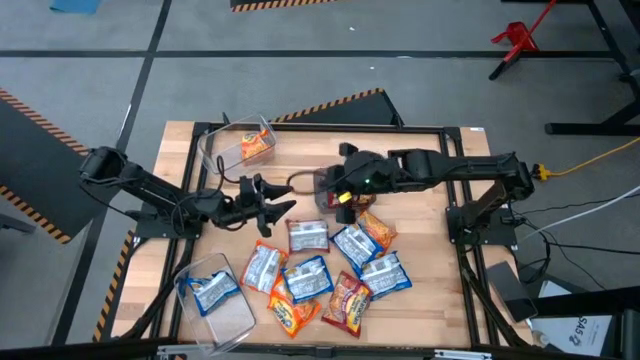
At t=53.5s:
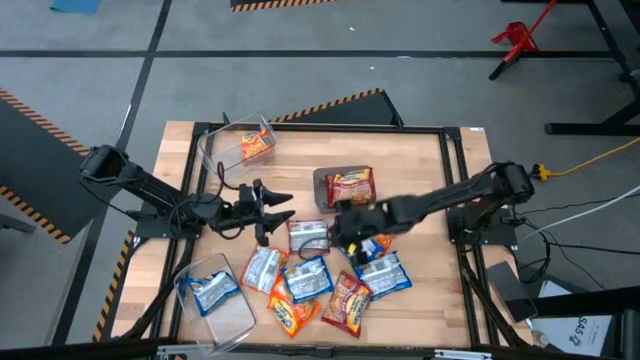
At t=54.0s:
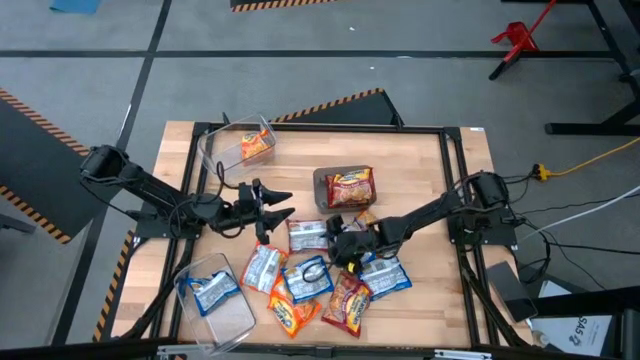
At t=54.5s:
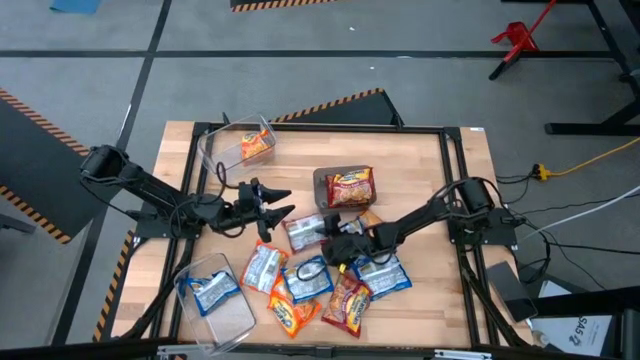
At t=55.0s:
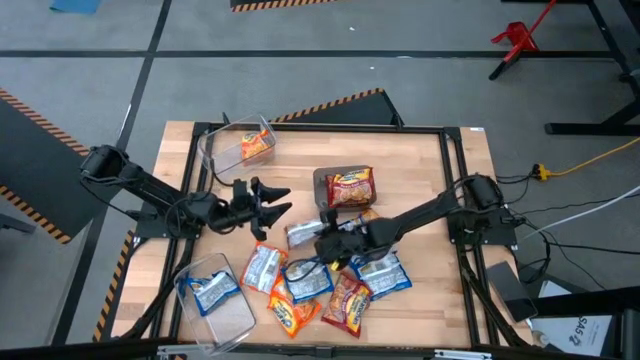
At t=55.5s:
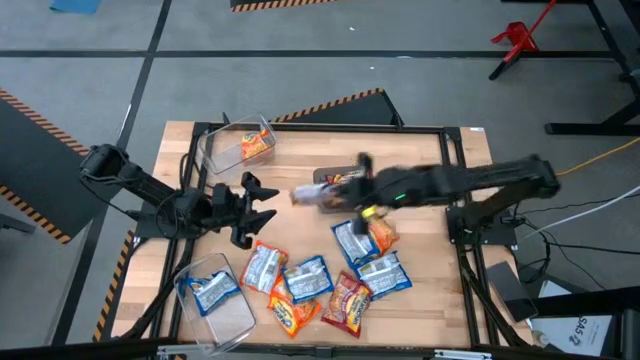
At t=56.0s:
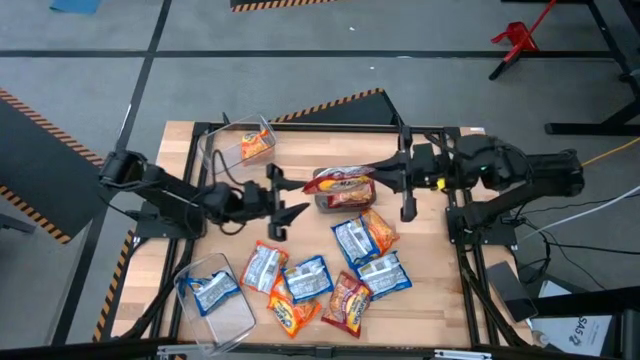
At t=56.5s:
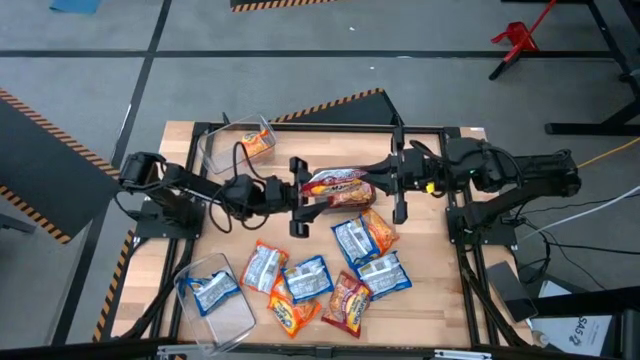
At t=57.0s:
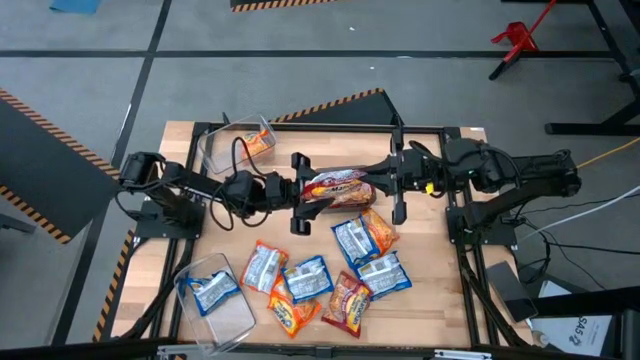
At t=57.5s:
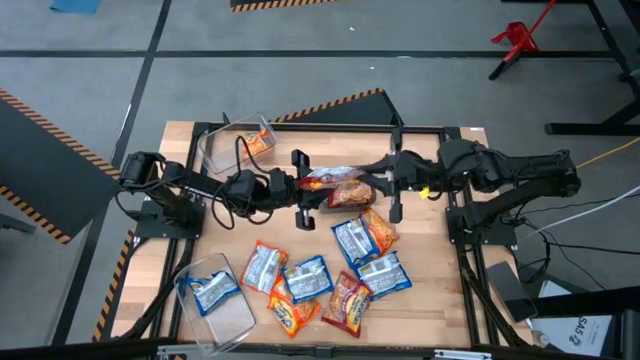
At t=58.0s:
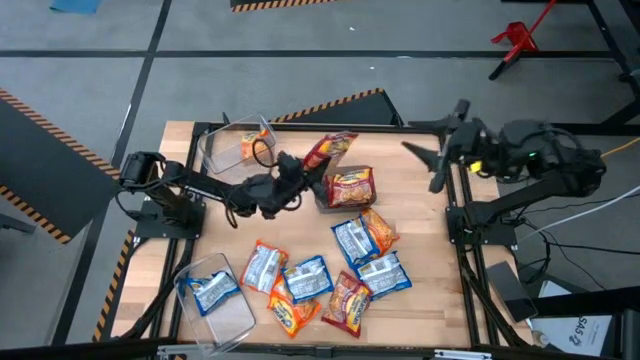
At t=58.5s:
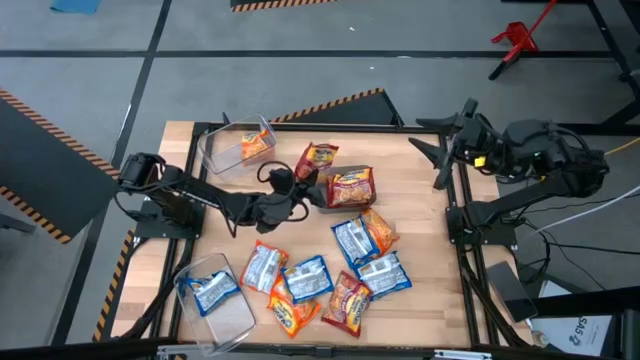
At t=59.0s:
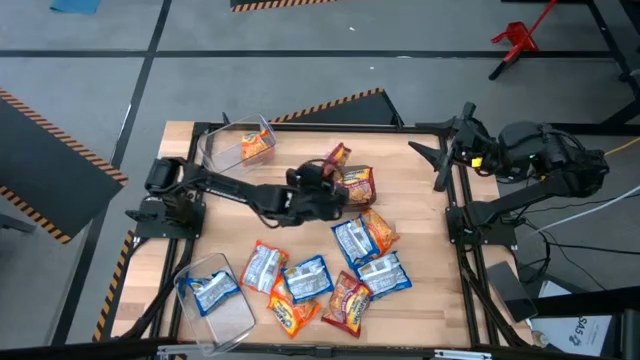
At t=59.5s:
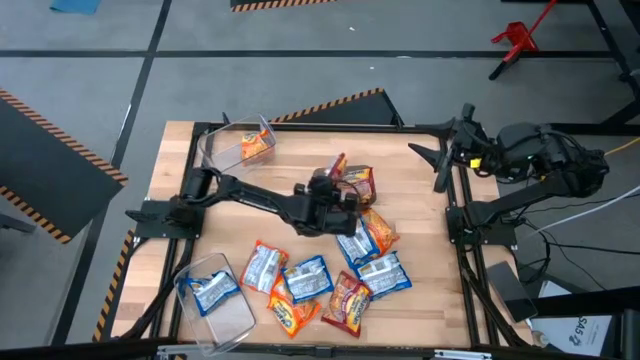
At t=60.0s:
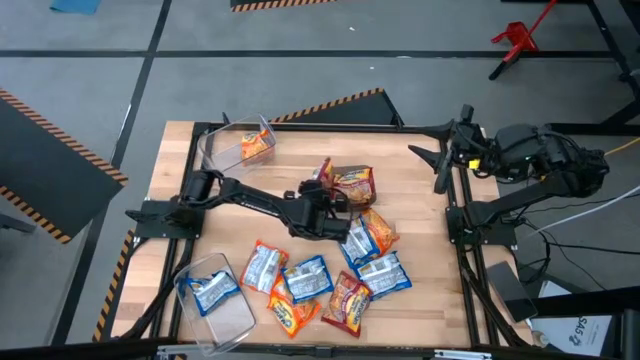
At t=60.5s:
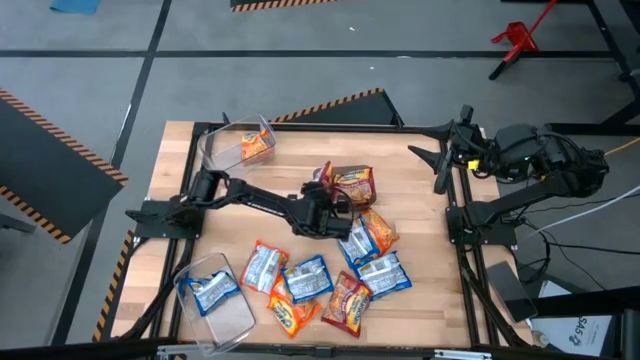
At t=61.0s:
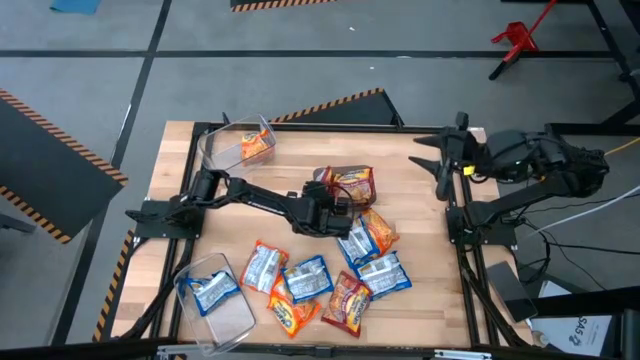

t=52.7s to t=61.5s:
Task: Sort Maruchan noodles
Put the red noodle pack into the black bin

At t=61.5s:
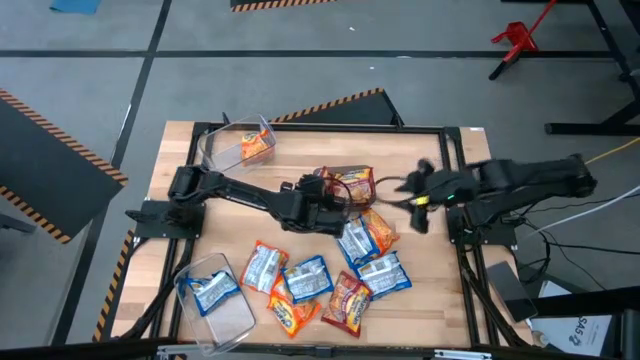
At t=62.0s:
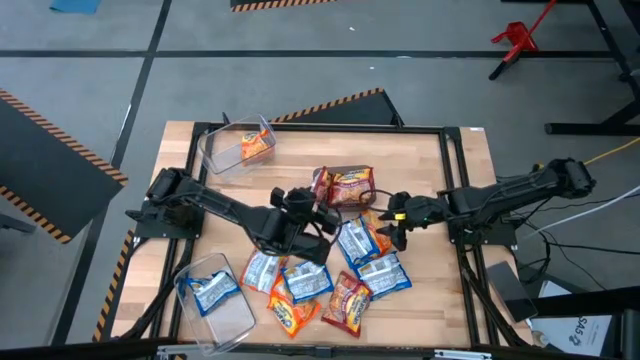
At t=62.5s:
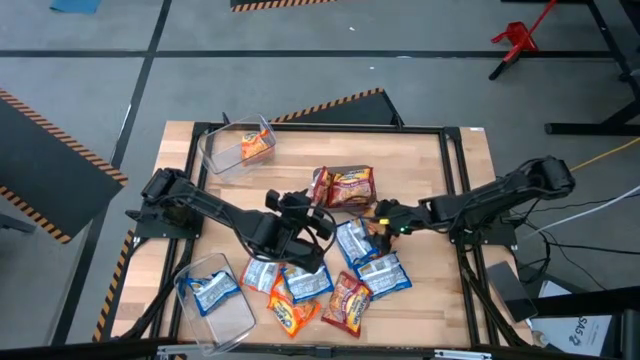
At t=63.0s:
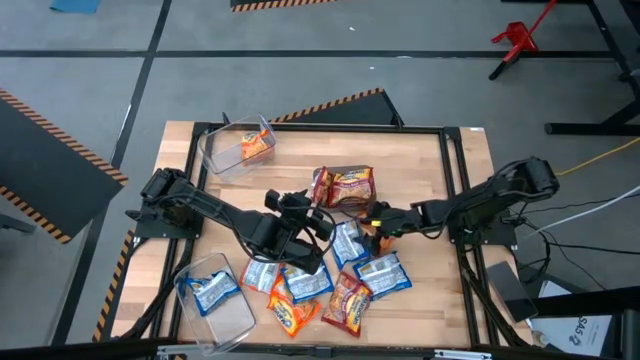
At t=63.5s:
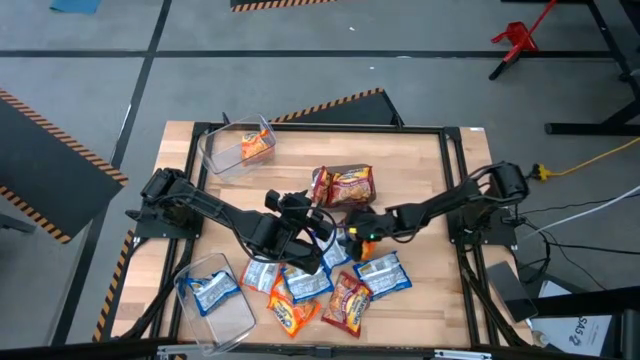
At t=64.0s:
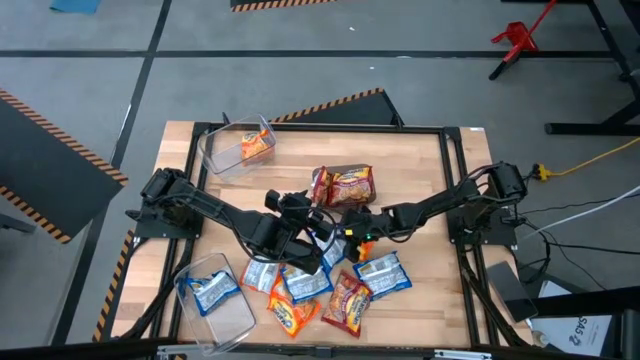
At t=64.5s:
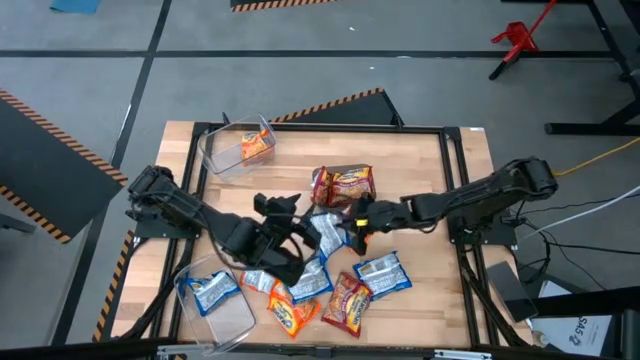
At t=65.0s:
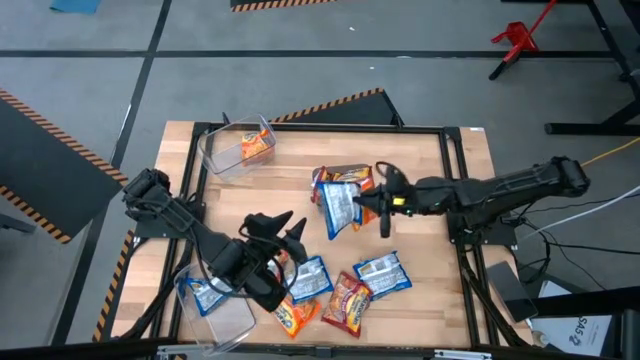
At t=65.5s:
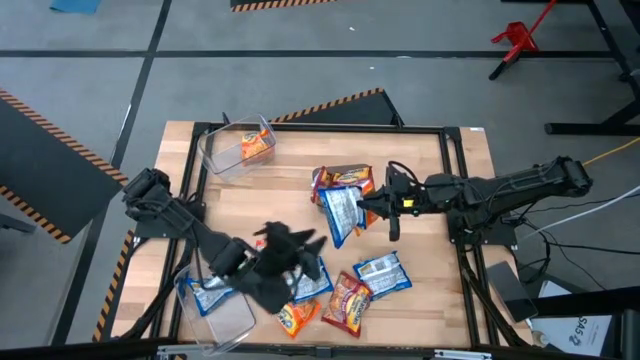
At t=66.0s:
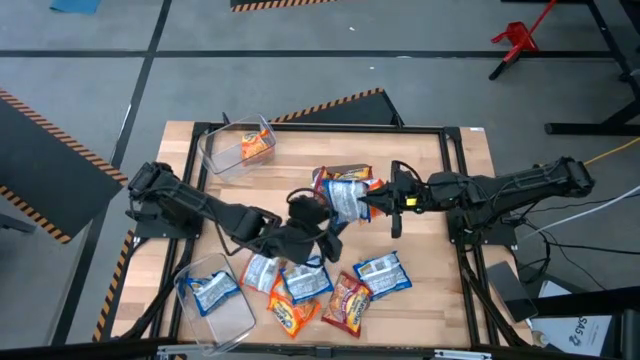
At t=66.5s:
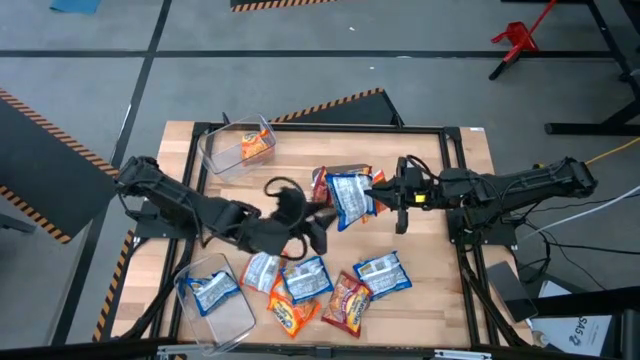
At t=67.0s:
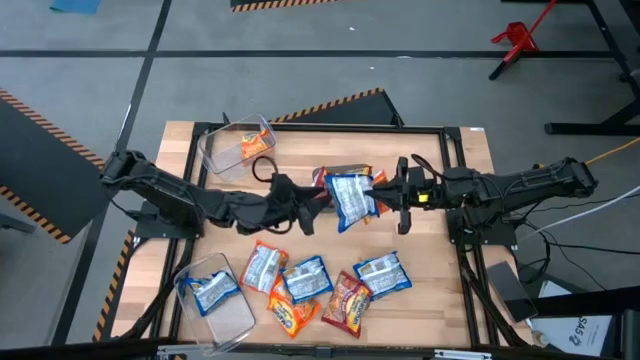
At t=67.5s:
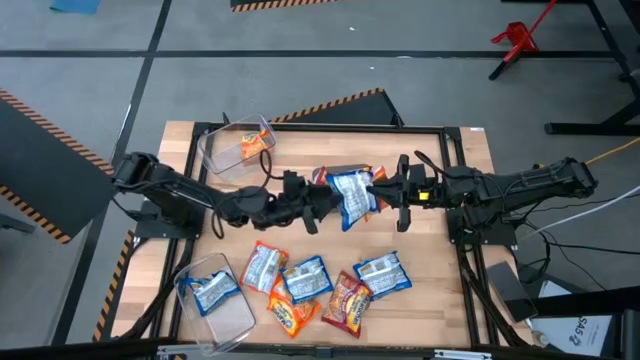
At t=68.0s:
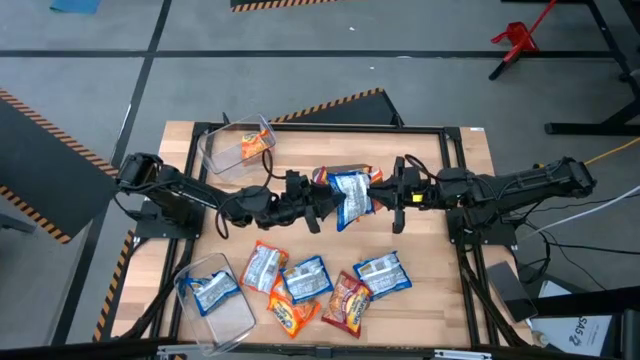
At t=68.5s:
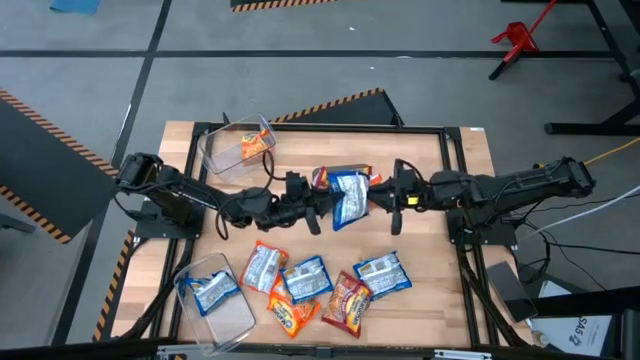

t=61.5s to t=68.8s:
Put the blue noodle pack into the bottom transparent bin

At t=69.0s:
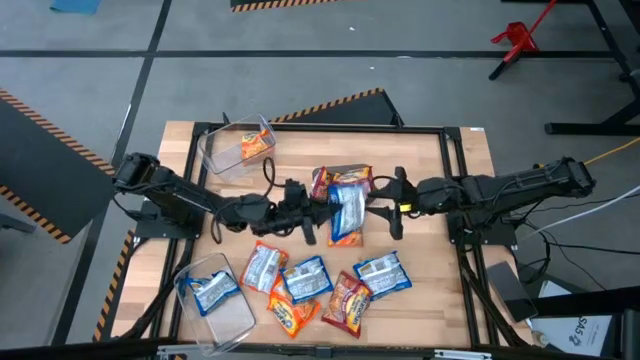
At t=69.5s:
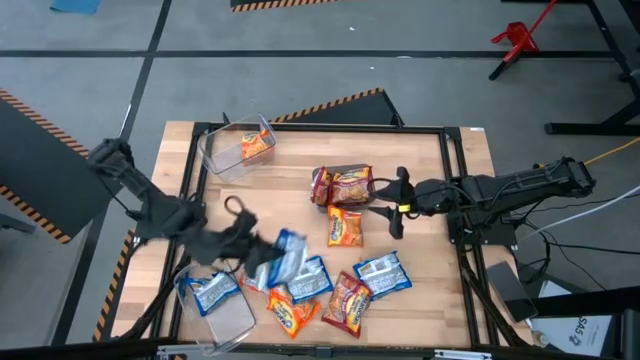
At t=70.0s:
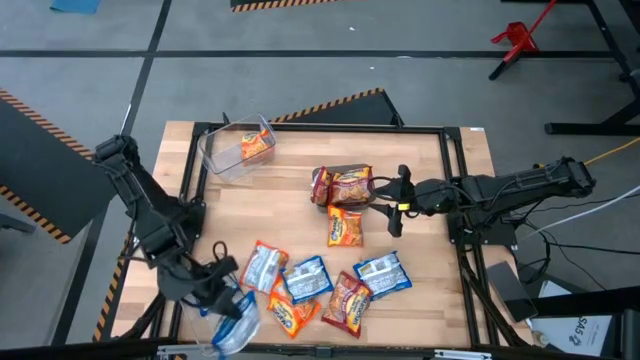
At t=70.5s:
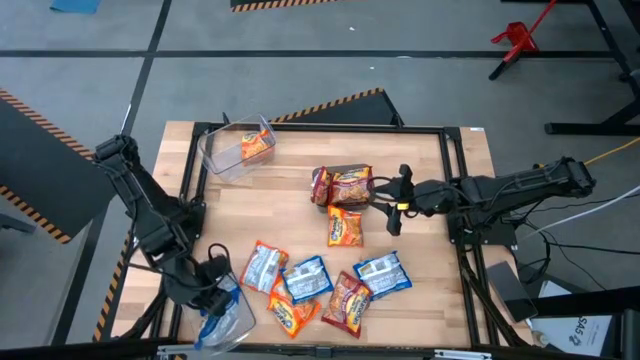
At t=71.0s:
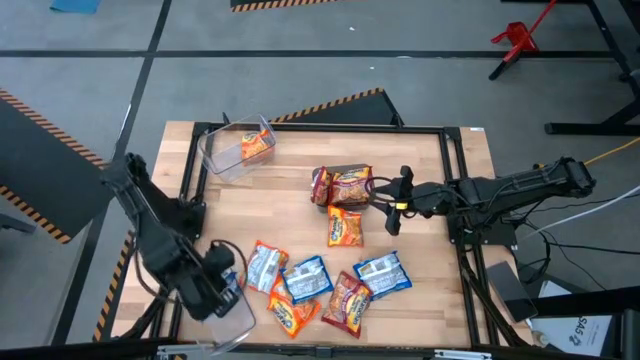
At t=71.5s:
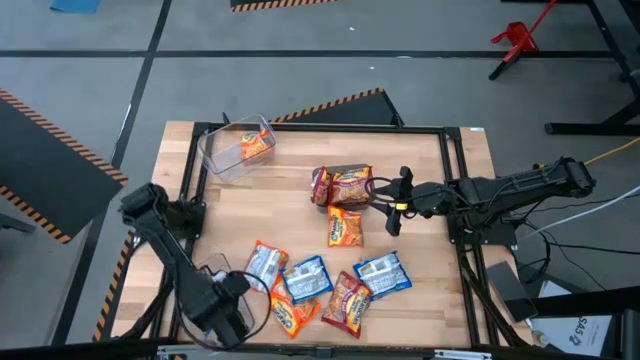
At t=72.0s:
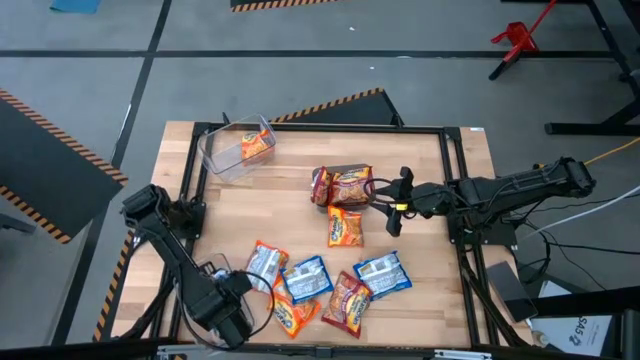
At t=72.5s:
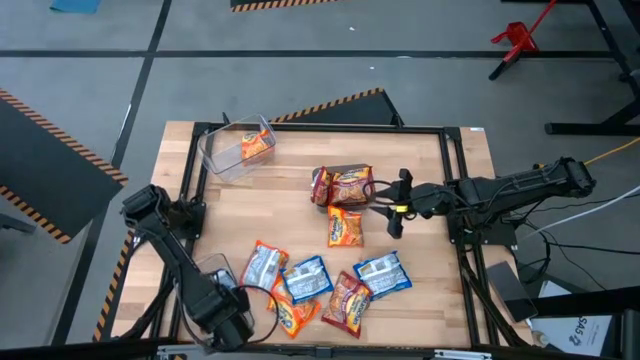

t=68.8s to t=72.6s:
Put the blue noodle pack into the bottom transparent bin

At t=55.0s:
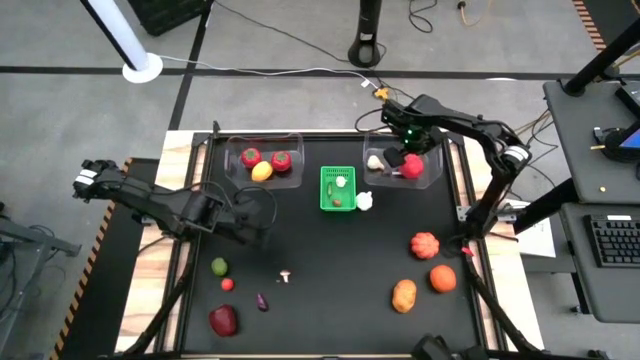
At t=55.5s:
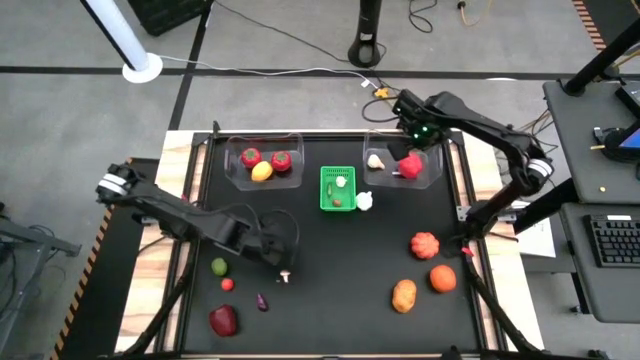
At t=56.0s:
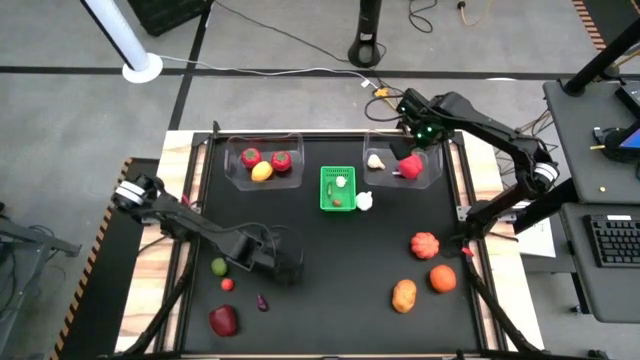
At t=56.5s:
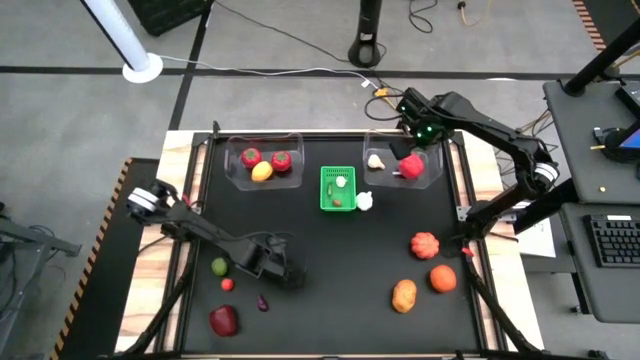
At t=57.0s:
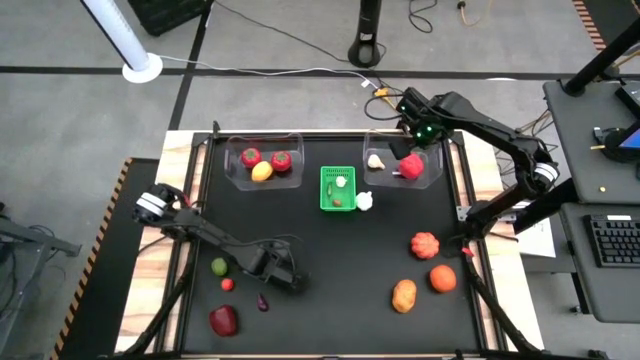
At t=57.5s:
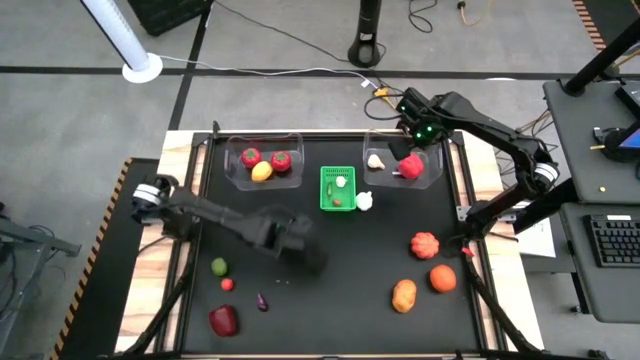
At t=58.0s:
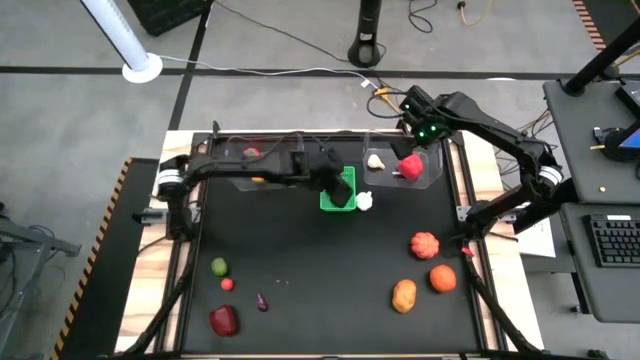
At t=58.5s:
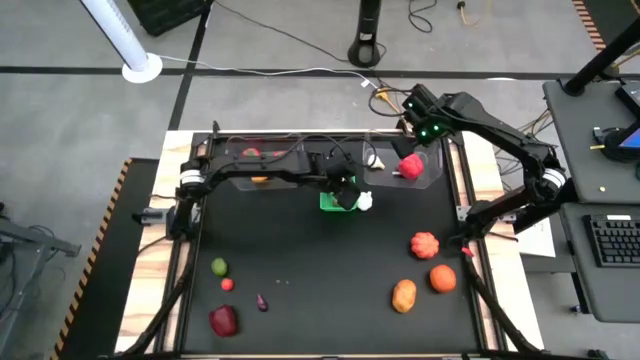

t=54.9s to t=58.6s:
Task: Sort produce into baskets
Put the mushroom into the green basket
